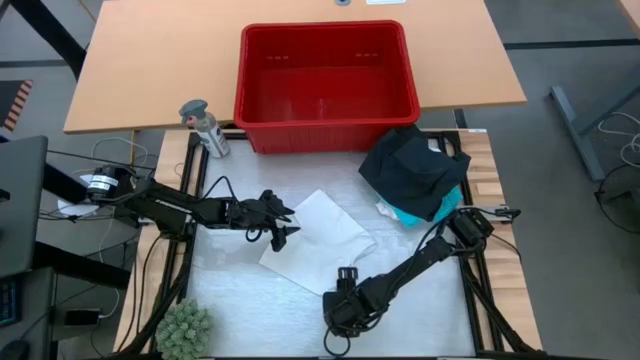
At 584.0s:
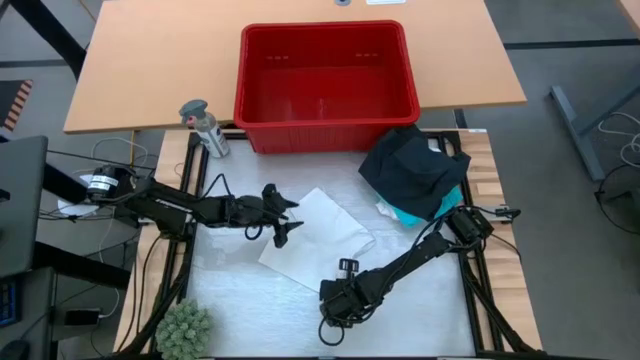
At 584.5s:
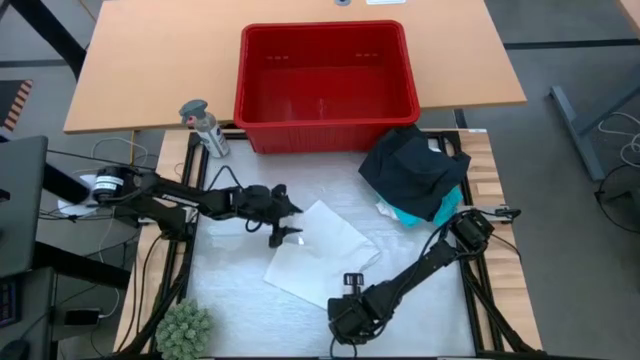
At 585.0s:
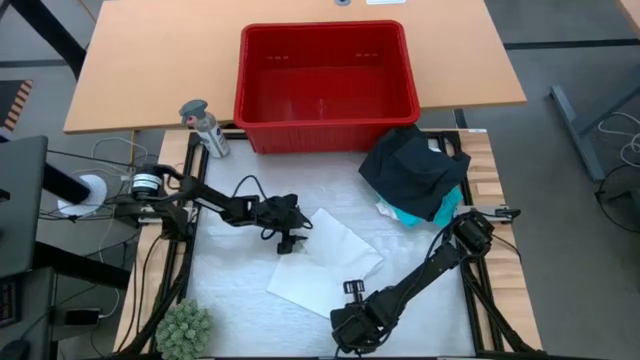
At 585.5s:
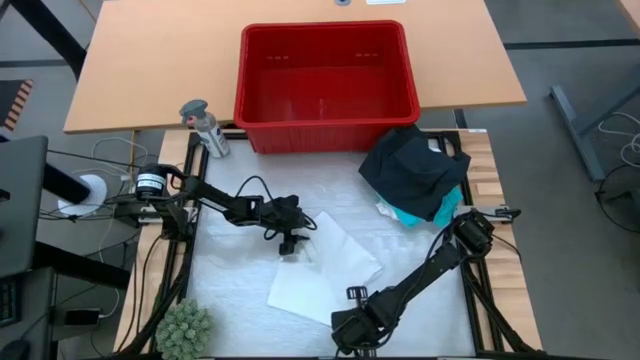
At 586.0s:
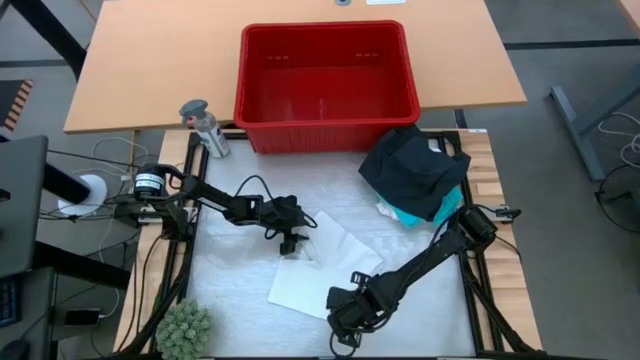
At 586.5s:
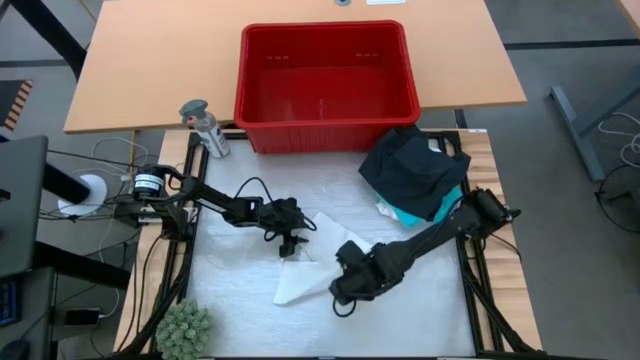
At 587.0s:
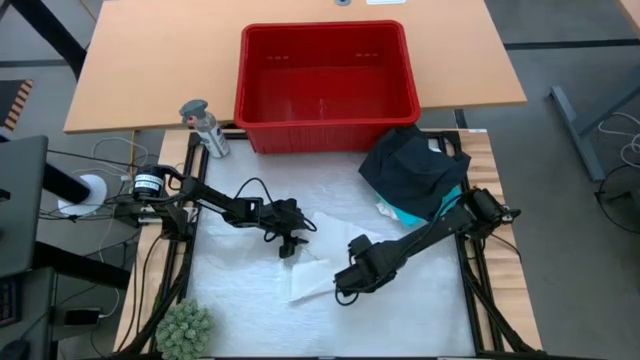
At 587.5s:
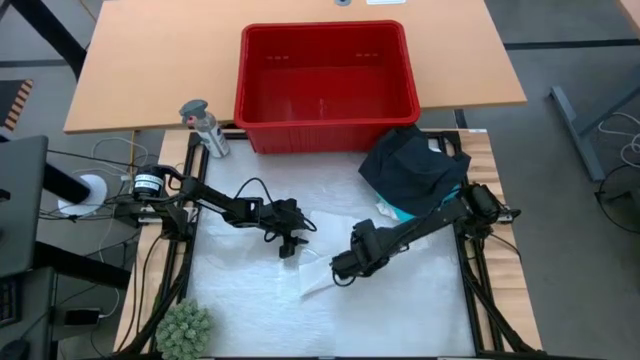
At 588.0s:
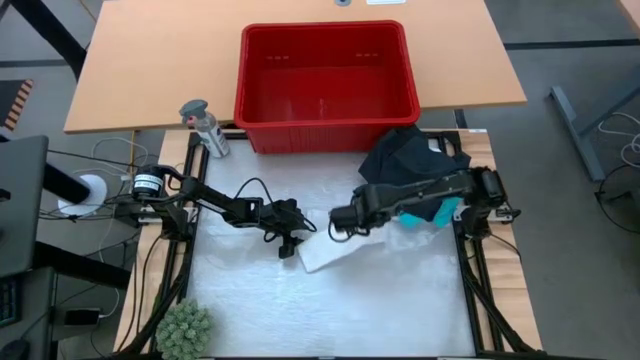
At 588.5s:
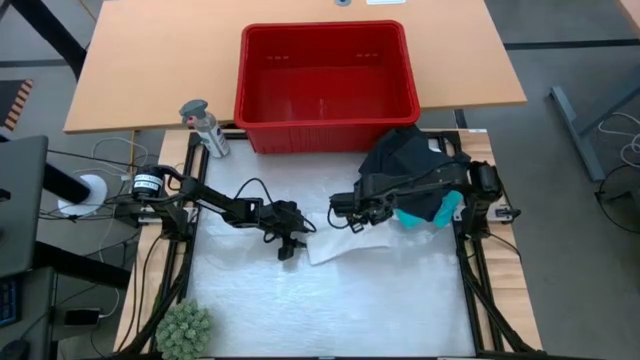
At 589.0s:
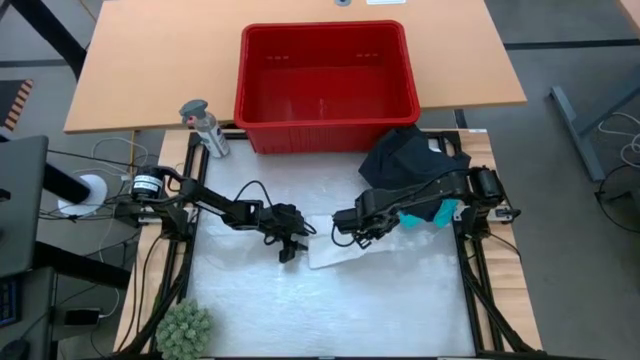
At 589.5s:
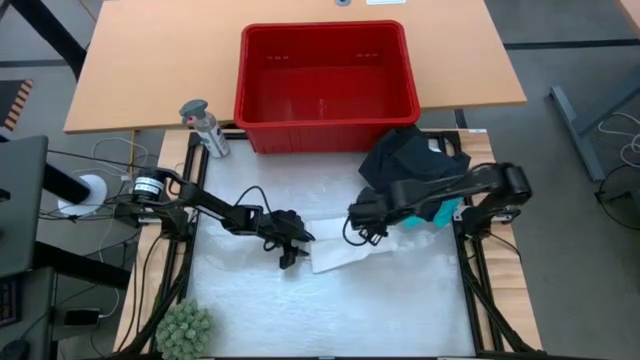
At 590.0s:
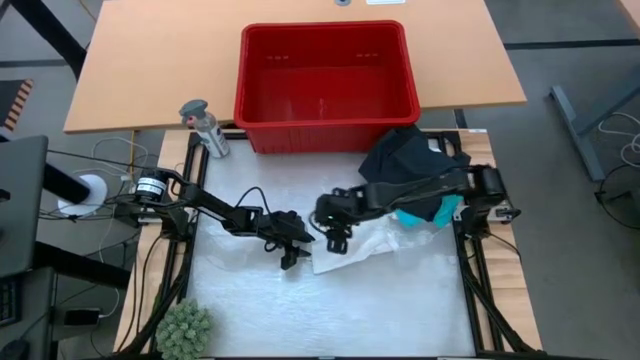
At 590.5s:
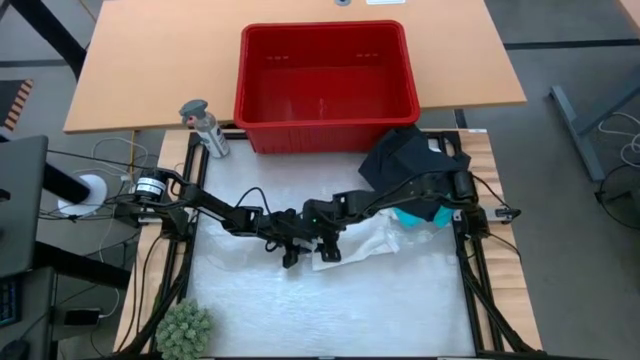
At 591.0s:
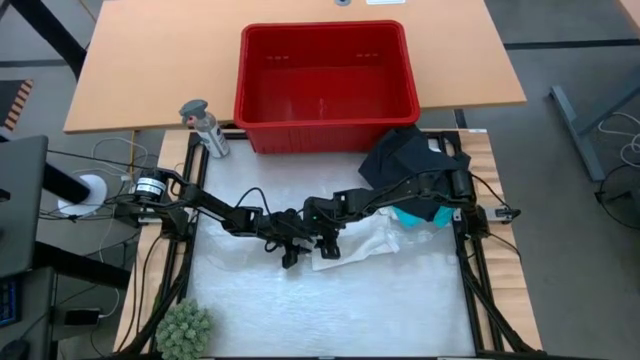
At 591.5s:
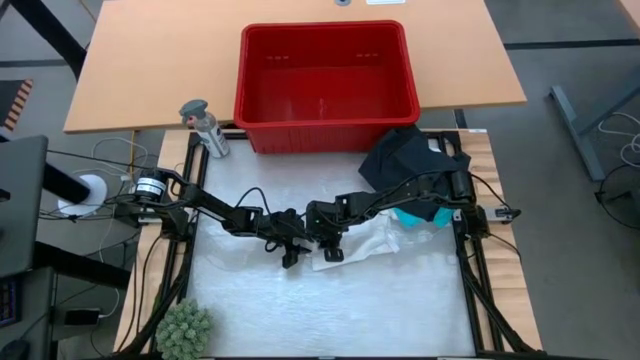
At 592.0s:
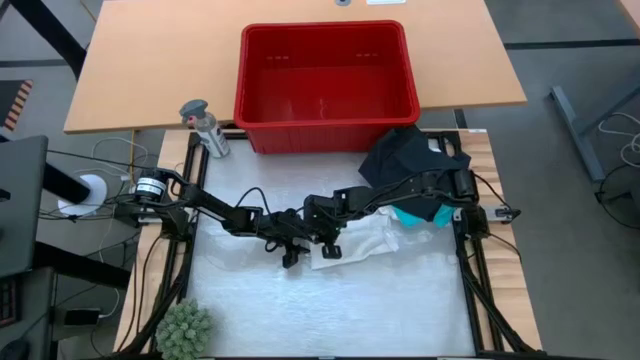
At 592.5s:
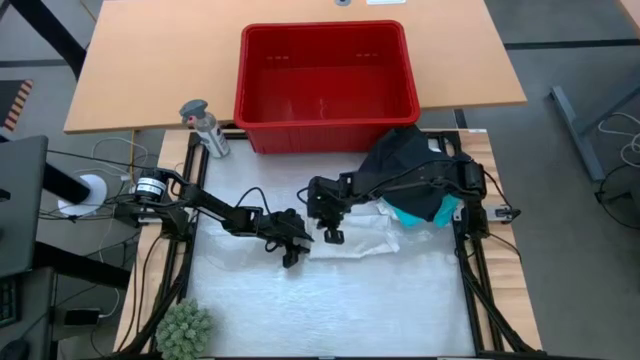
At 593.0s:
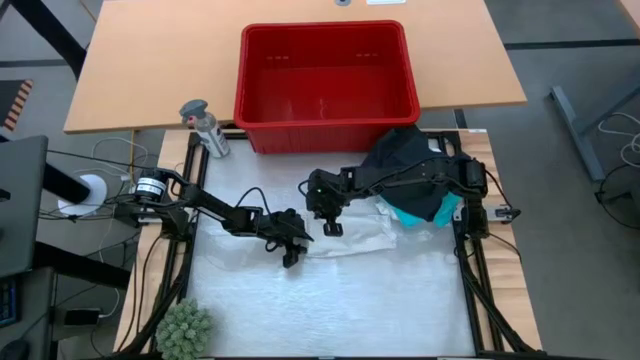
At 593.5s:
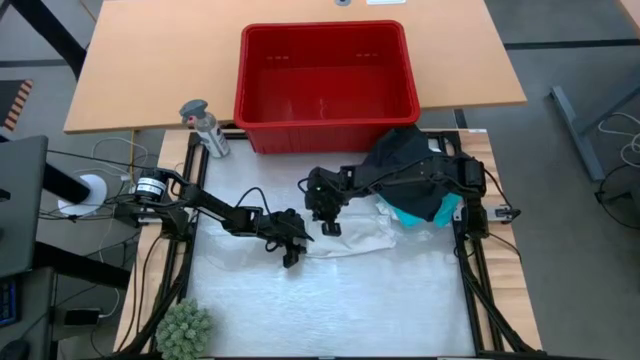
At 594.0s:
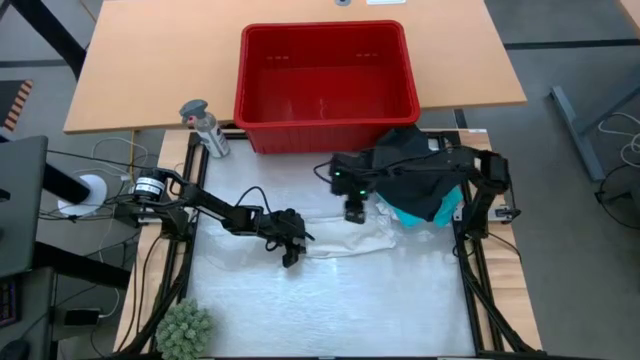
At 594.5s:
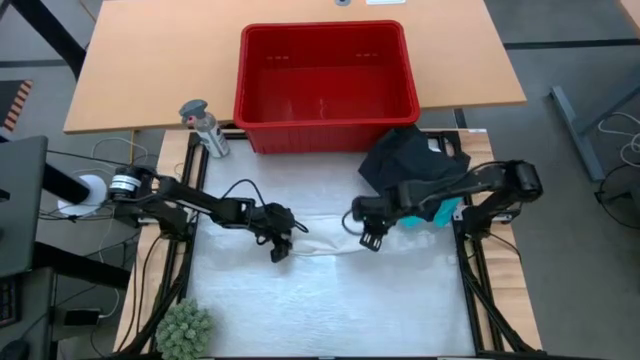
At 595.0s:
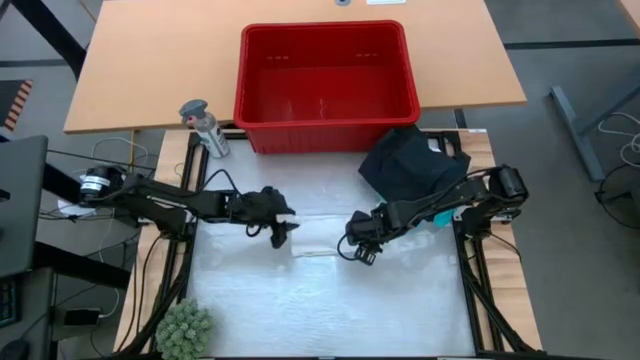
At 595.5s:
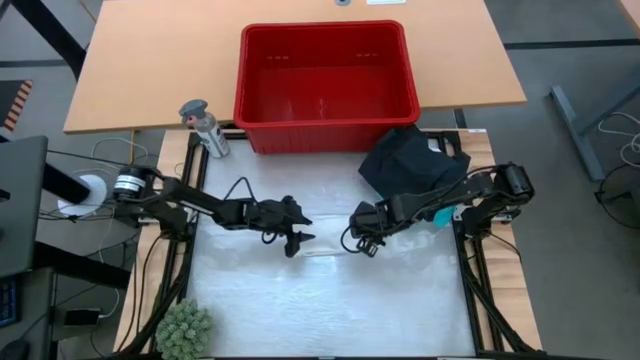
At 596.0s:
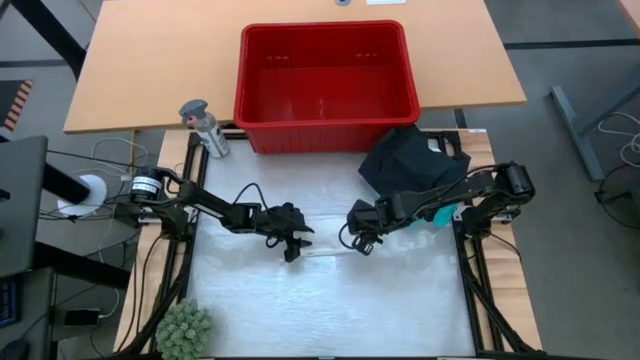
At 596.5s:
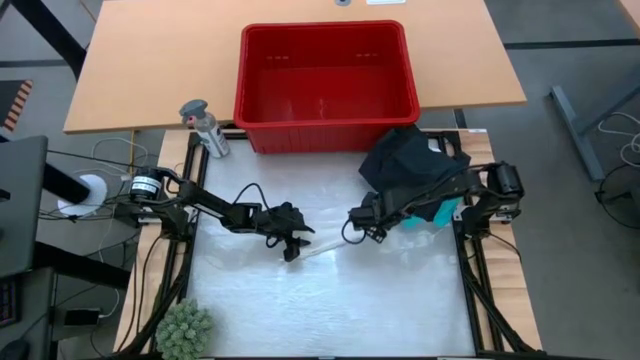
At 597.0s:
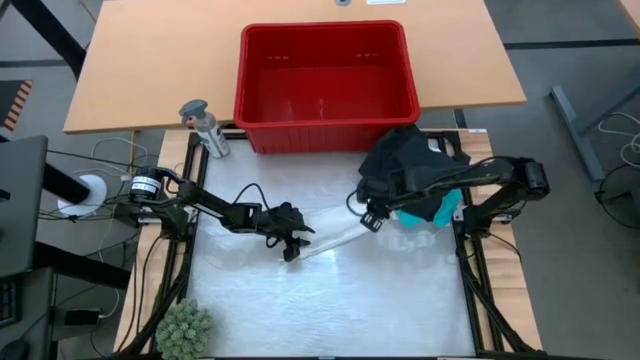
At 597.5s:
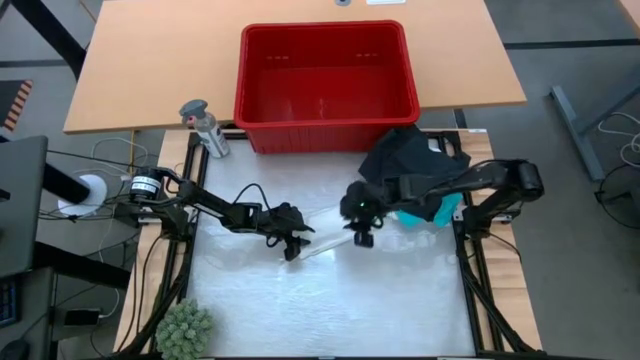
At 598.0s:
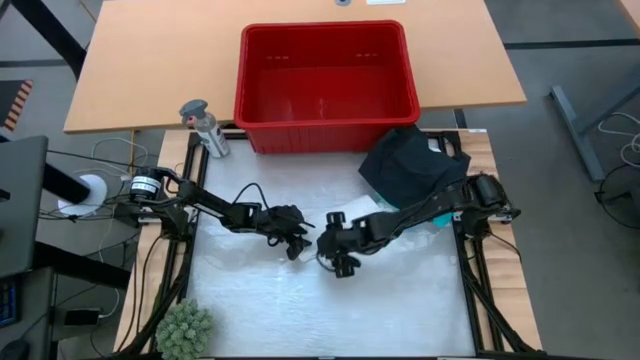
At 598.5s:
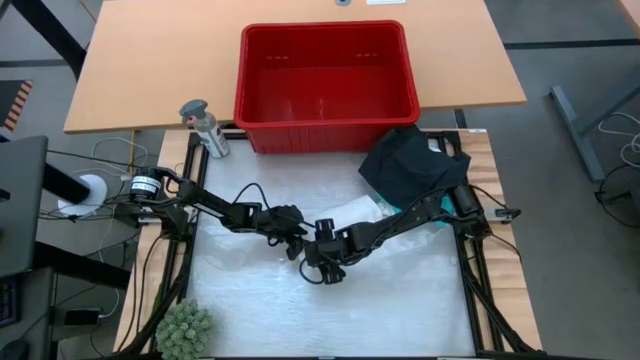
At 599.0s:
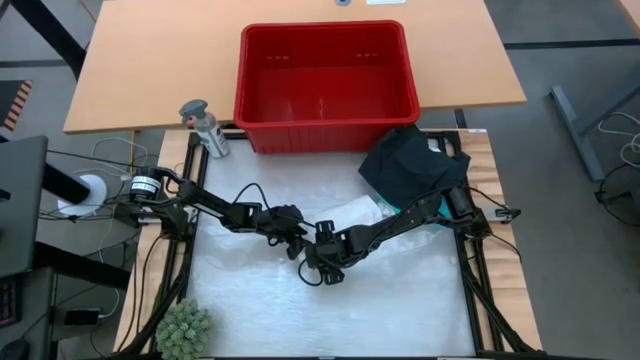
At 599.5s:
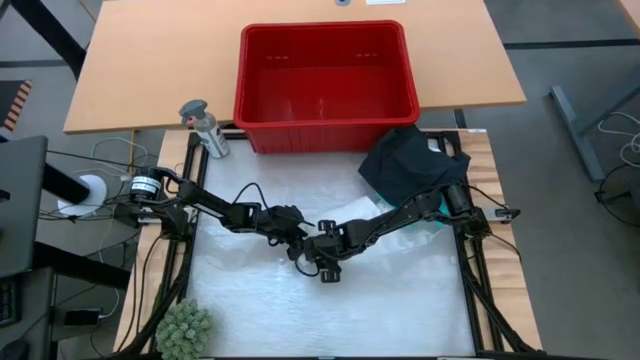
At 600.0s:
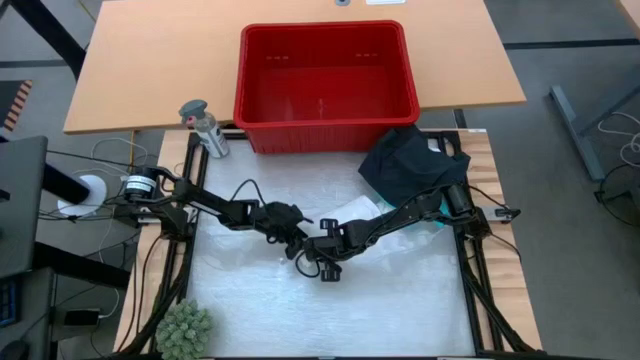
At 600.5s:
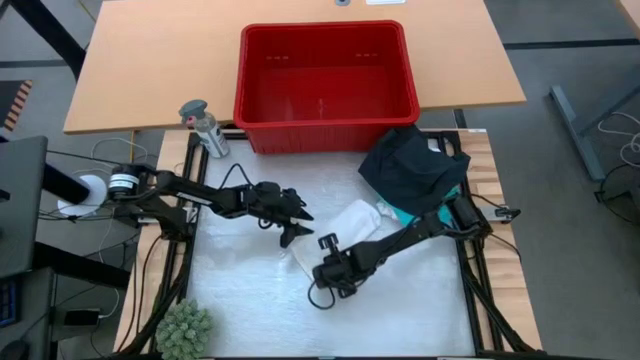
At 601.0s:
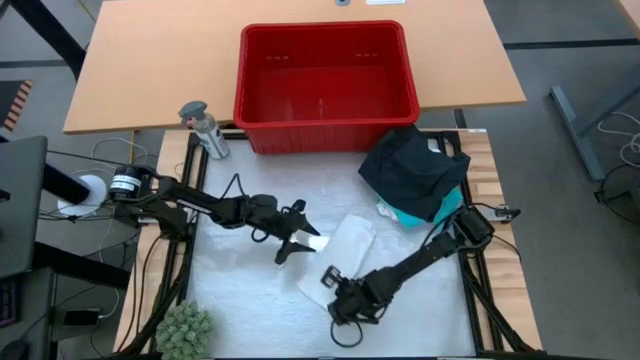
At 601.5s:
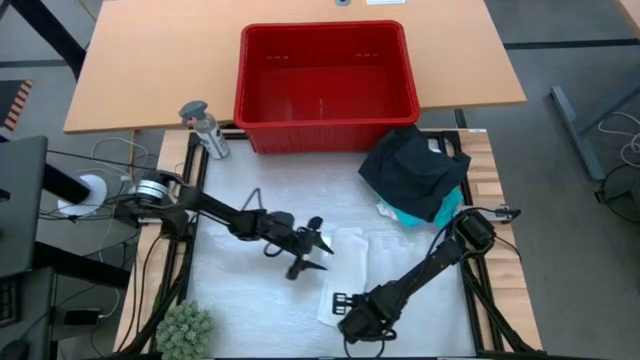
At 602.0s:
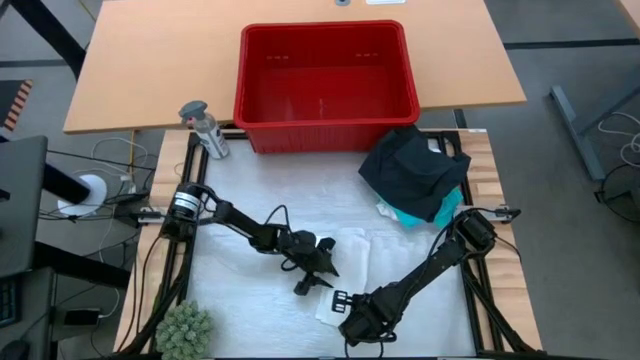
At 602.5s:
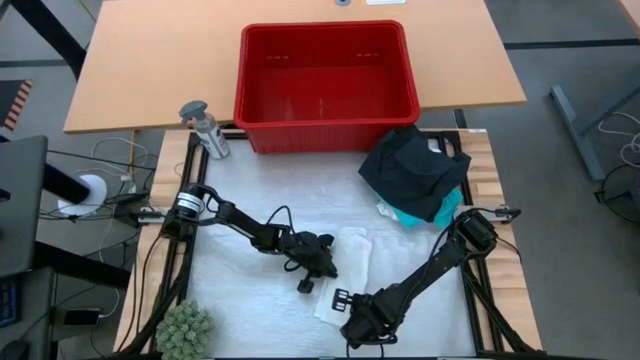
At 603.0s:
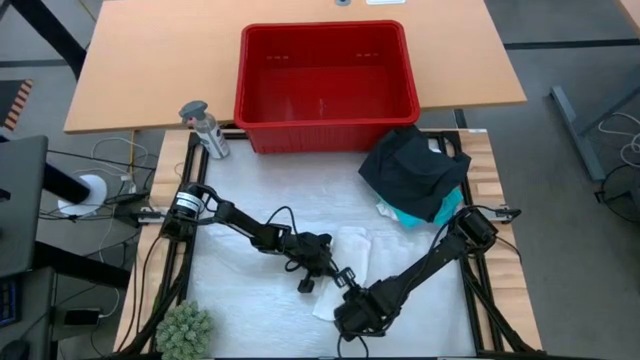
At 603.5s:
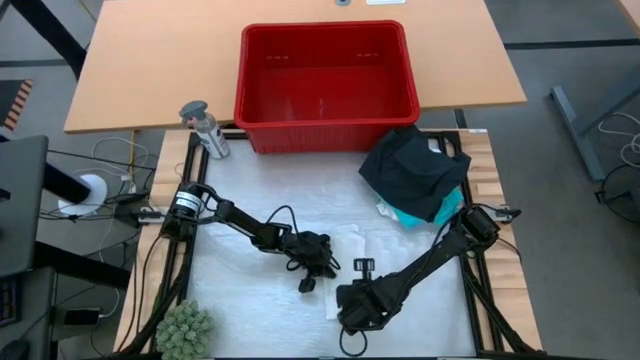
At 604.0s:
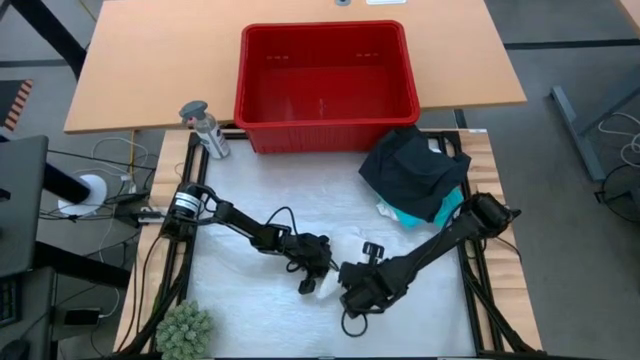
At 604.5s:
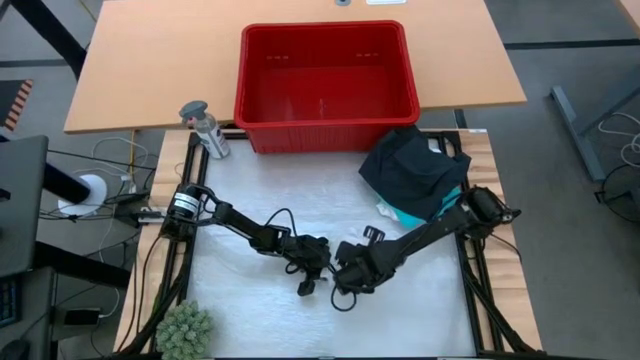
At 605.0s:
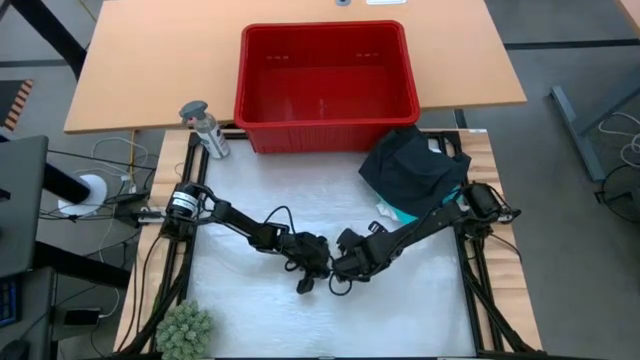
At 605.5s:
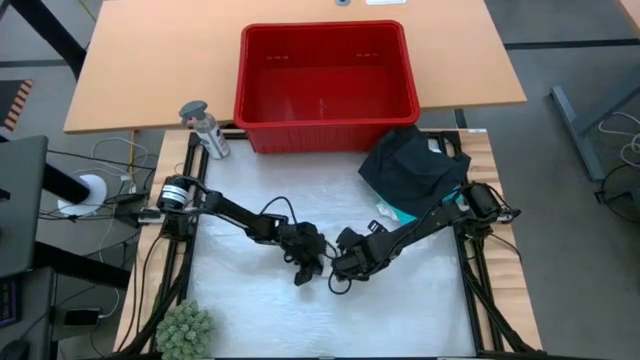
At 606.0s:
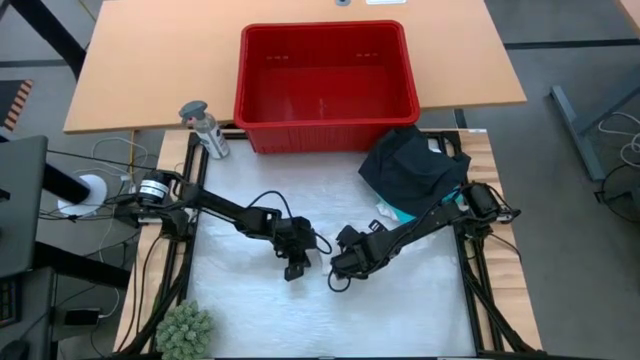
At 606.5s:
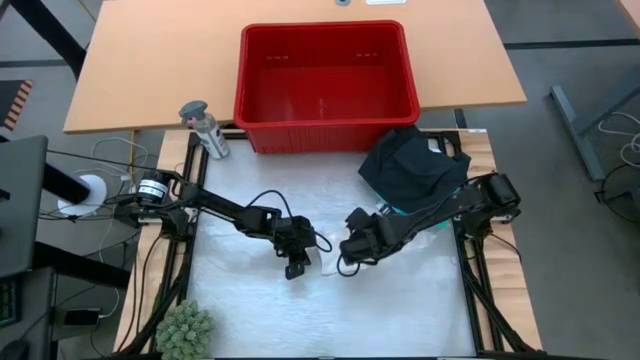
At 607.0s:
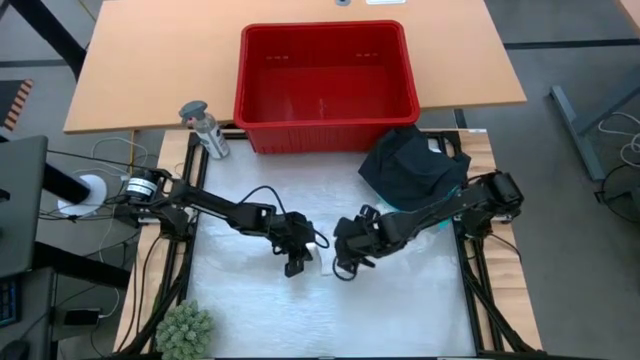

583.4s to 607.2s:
Task: Fold Laundry from Bin
Fold the white underwear
